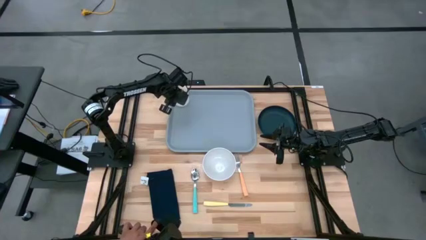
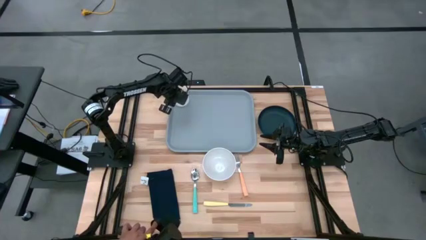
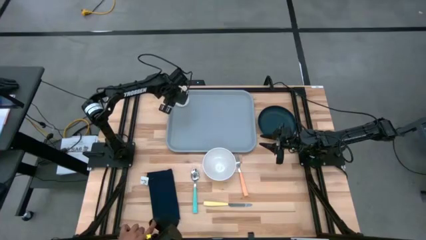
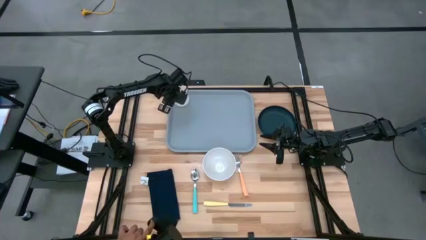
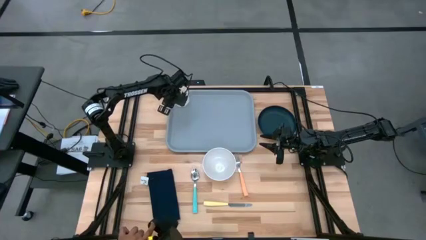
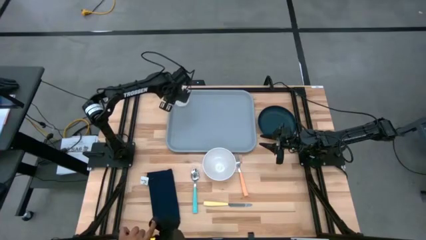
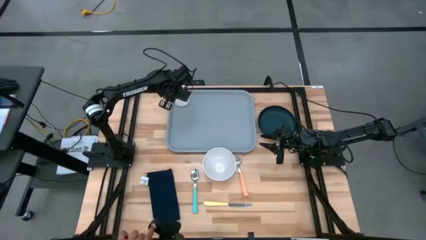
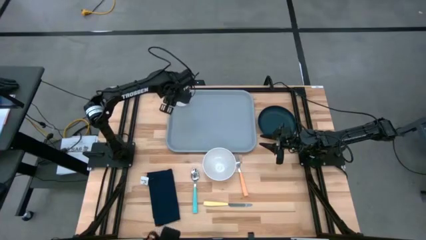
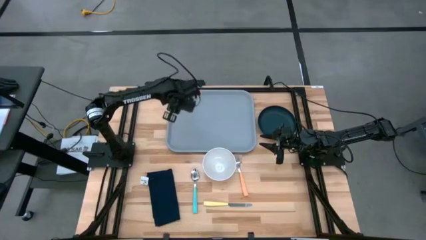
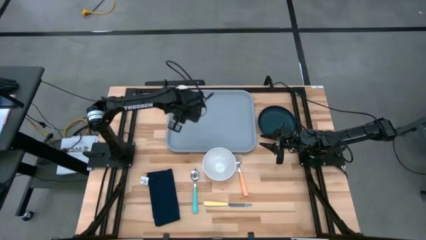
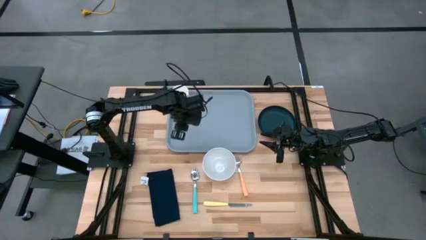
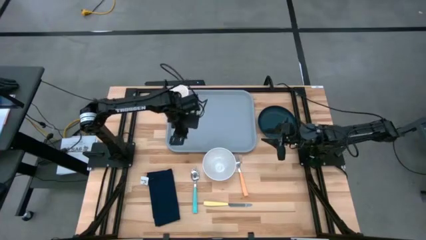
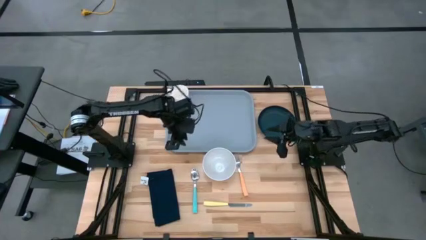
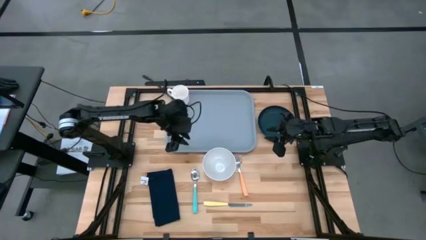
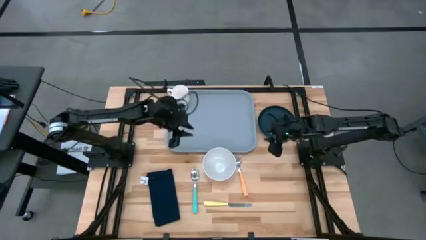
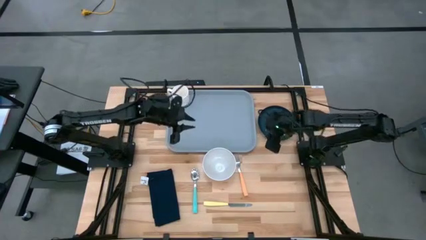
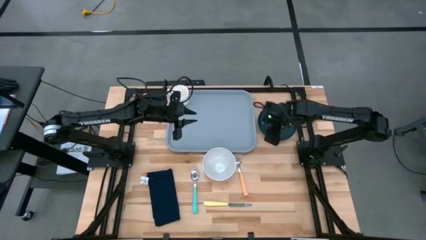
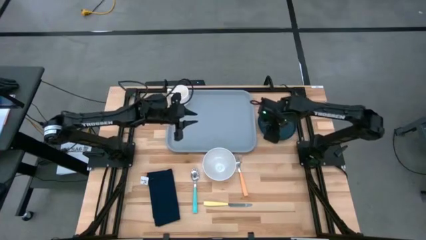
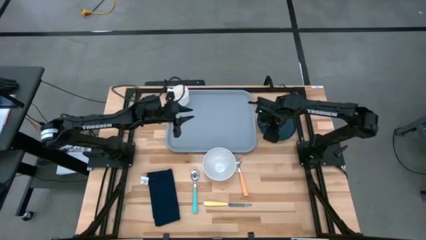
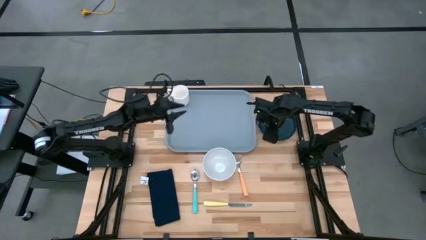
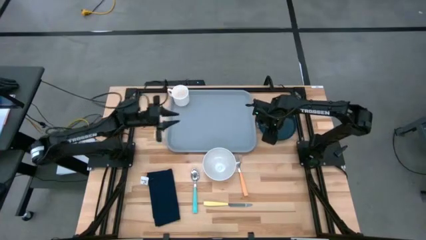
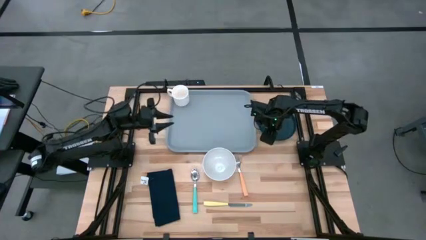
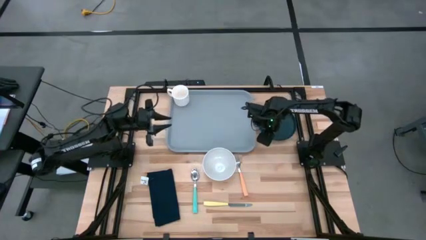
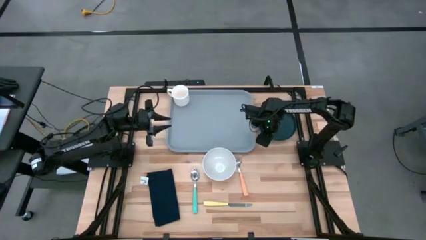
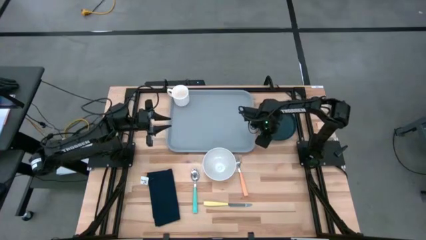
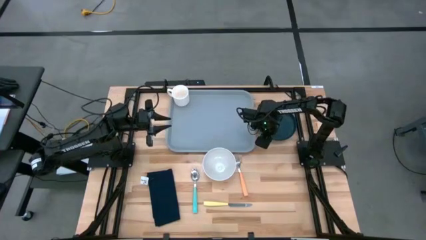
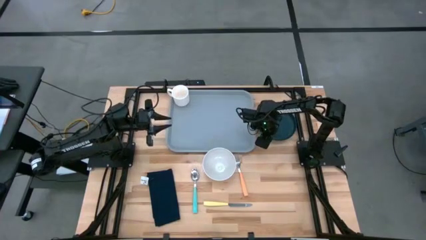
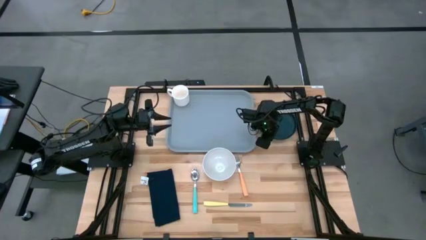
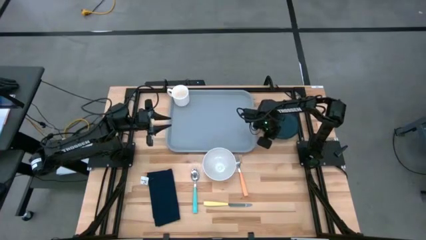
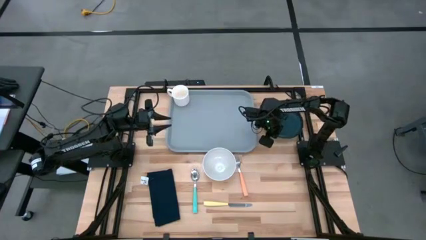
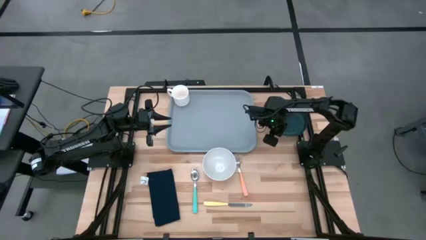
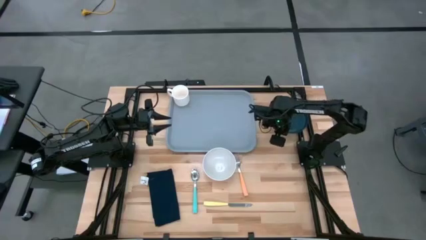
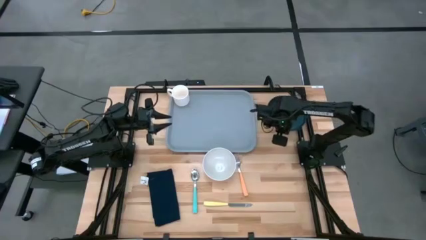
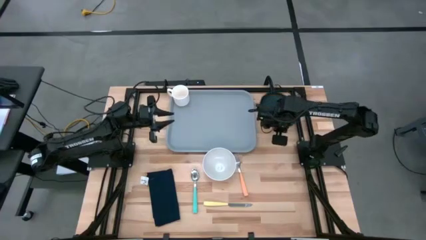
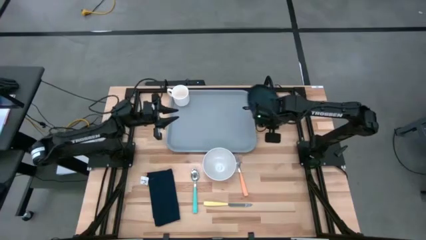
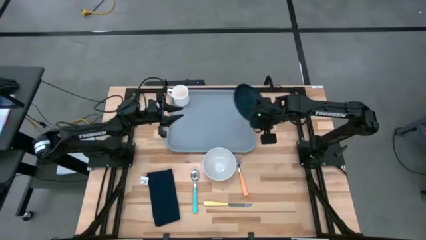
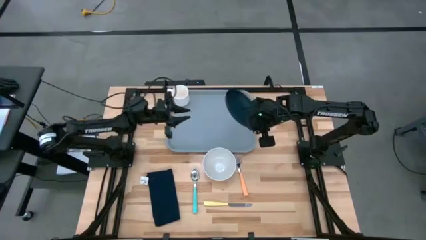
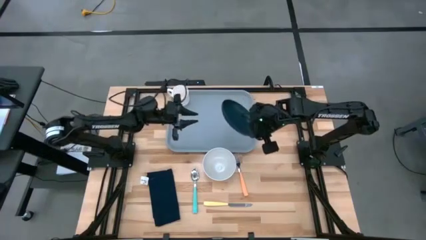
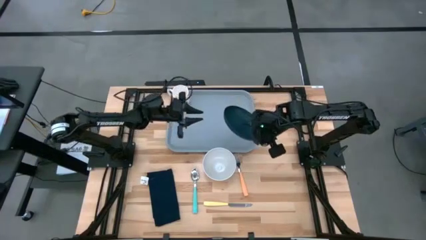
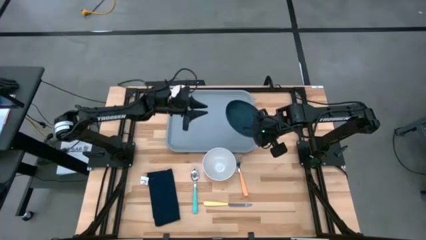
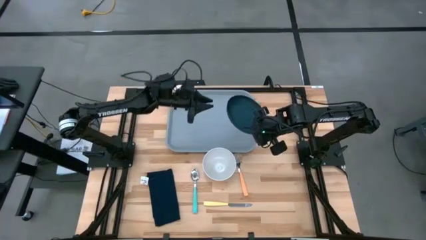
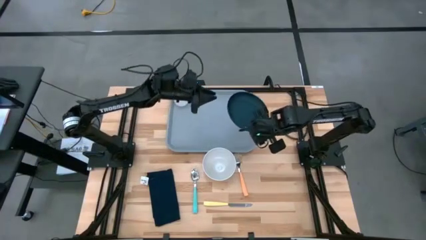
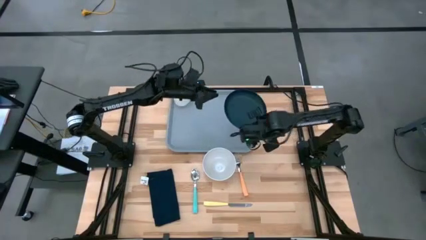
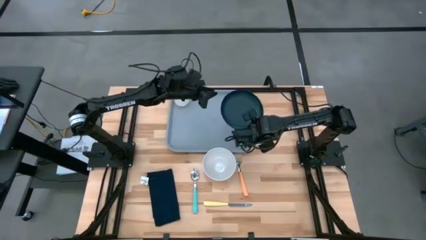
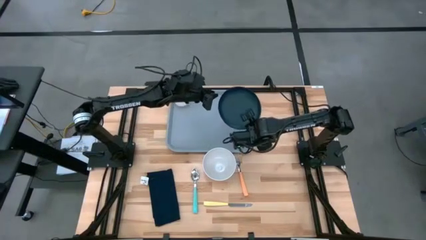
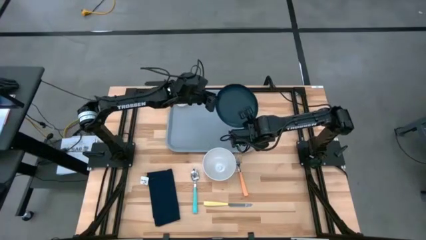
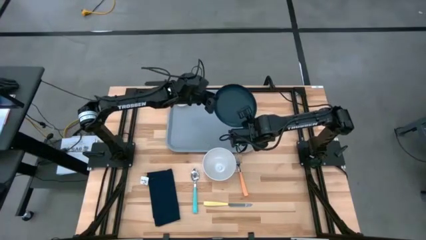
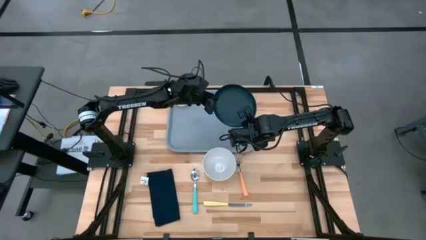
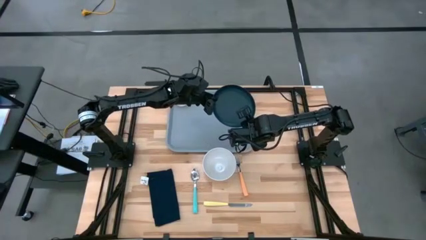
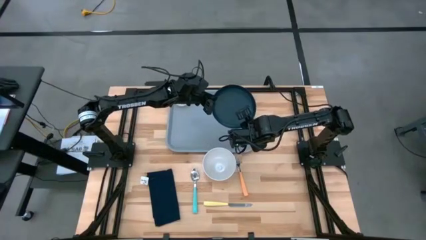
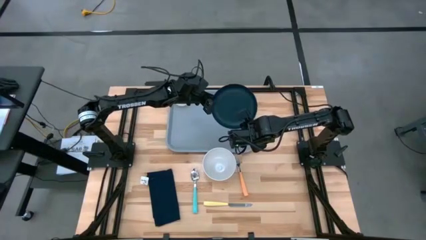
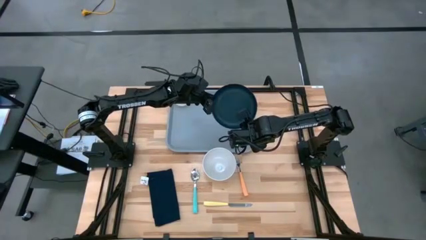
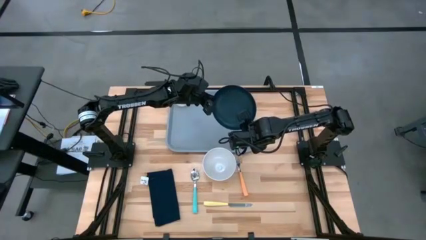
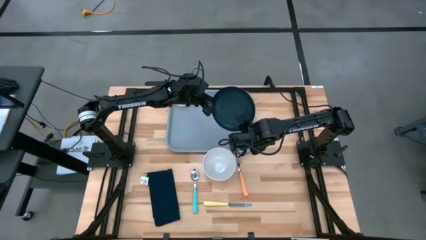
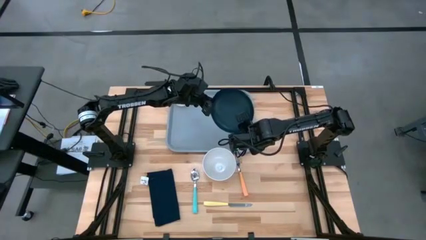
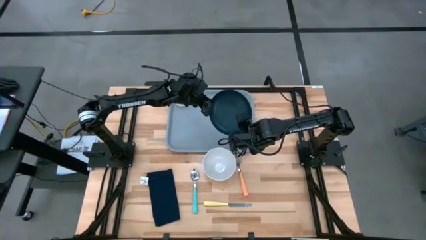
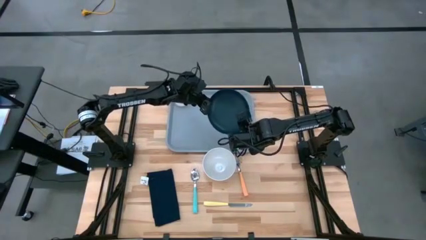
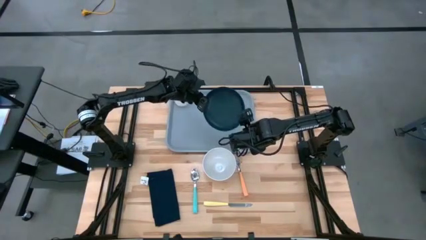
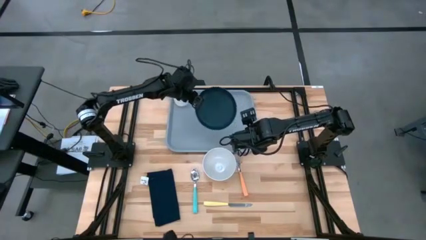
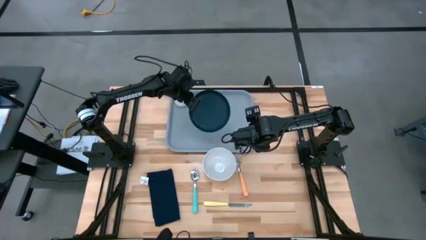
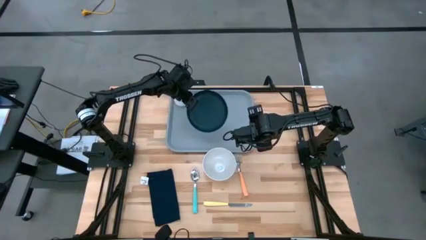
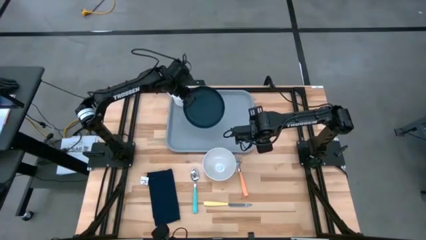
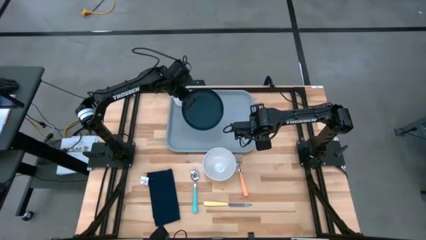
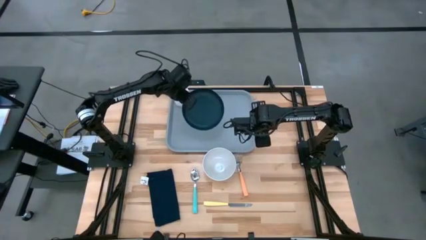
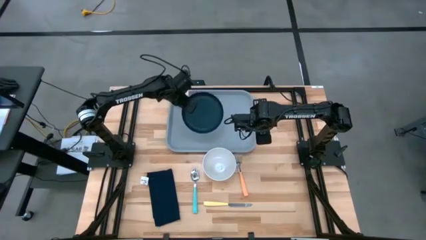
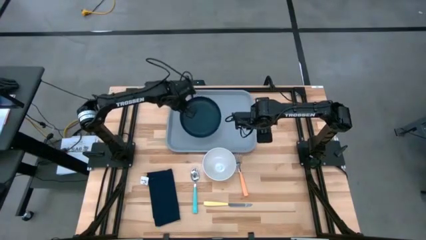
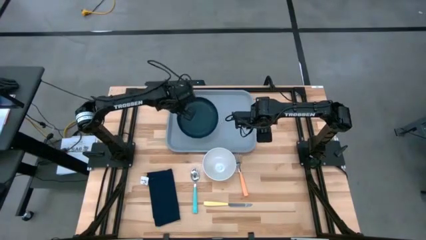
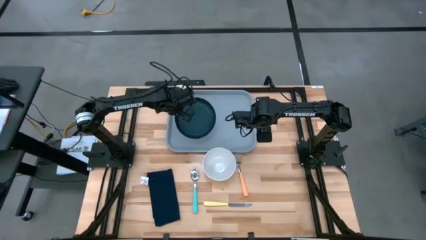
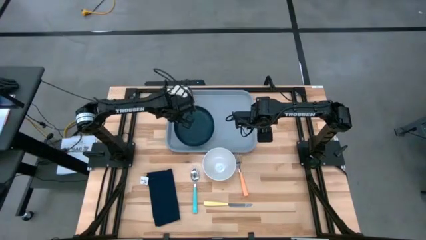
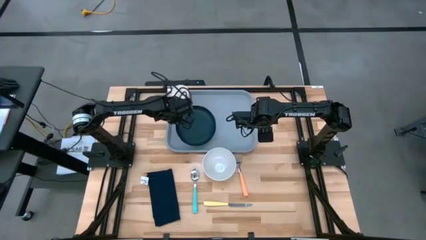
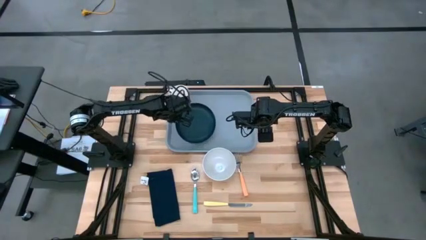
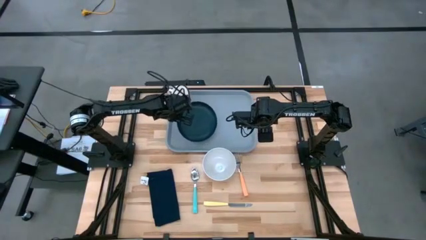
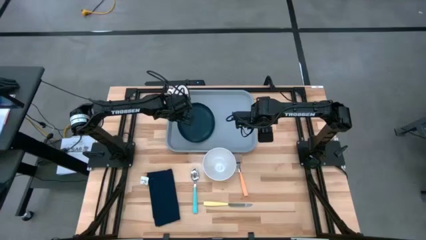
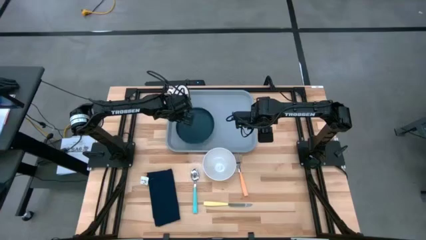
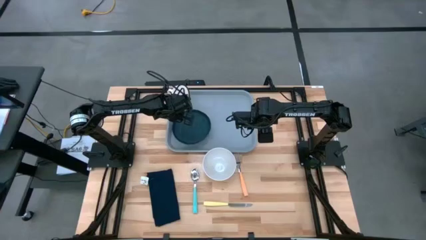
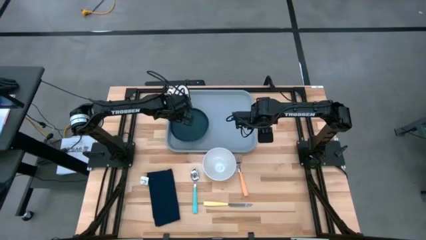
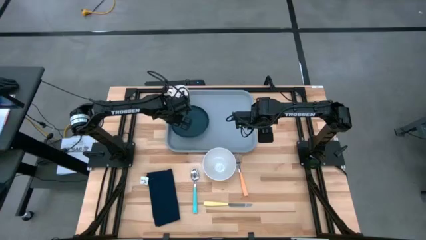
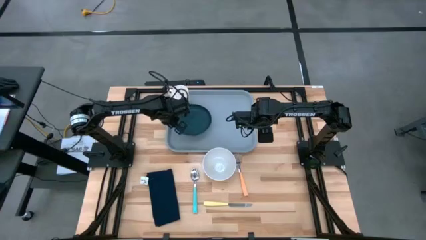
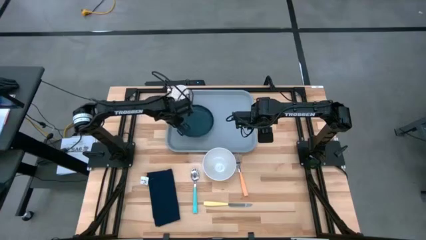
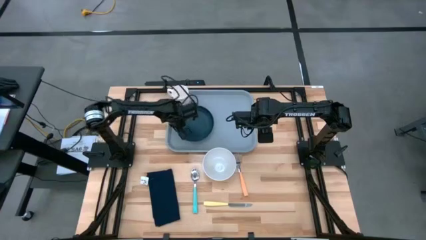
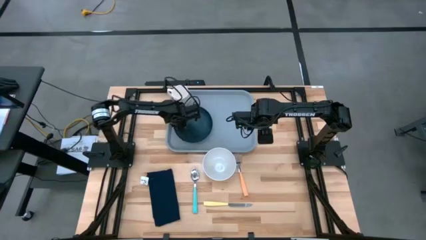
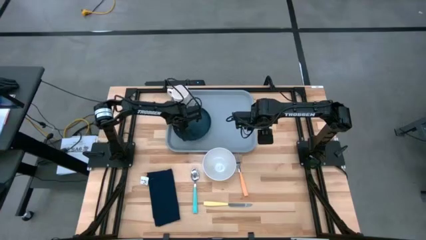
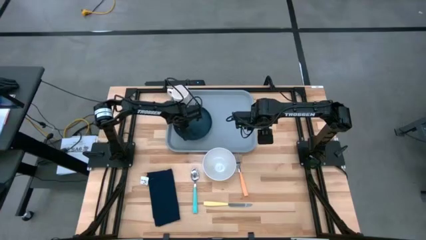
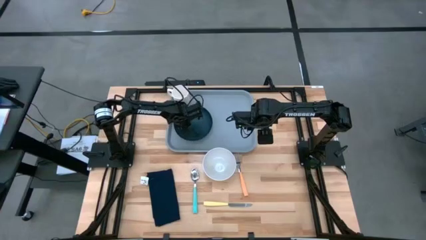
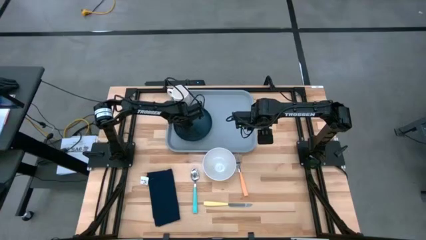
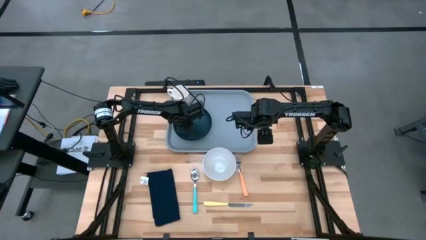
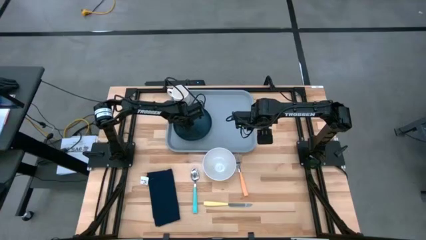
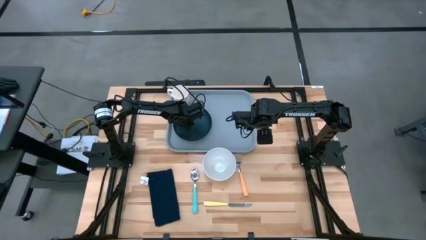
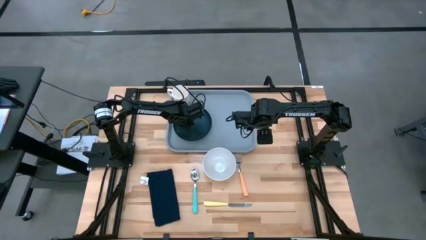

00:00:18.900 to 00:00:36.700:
Task: Set up tray
Put the green plate on the gray serving tray at the bottom of the white mug
